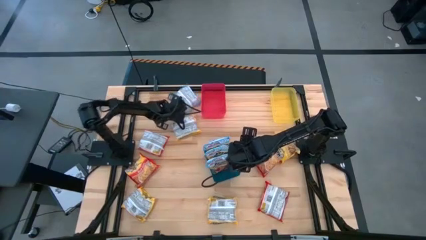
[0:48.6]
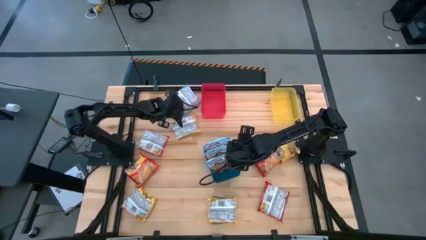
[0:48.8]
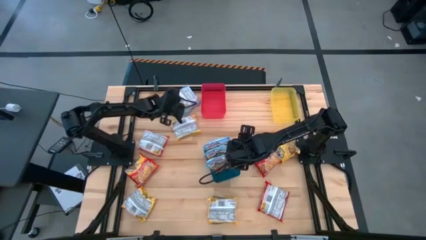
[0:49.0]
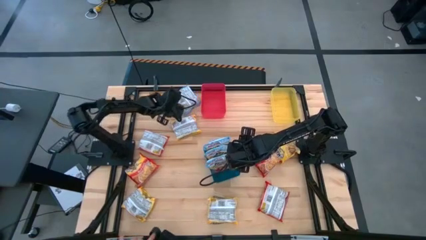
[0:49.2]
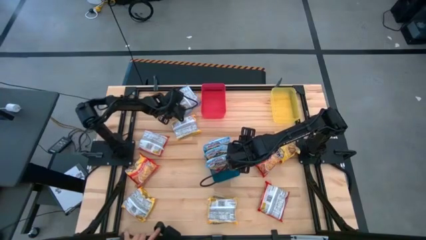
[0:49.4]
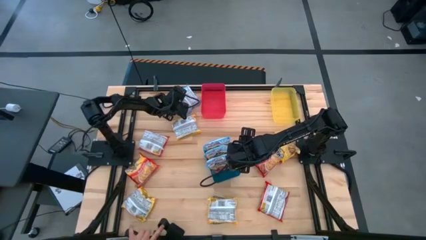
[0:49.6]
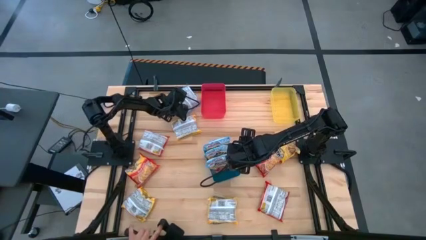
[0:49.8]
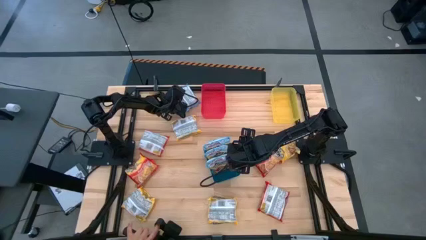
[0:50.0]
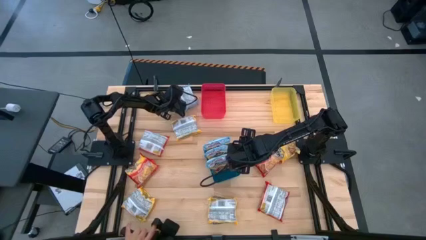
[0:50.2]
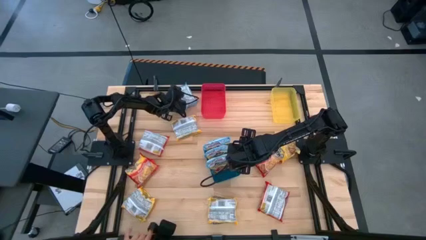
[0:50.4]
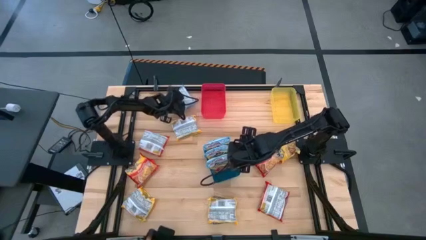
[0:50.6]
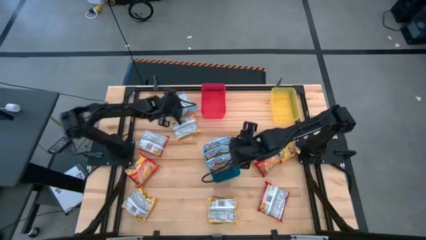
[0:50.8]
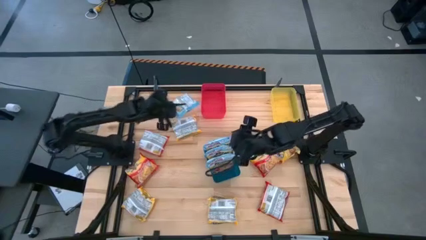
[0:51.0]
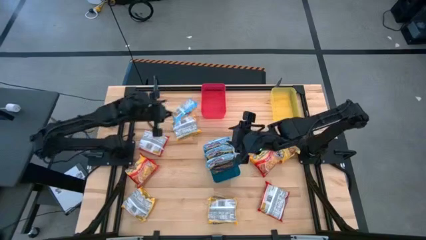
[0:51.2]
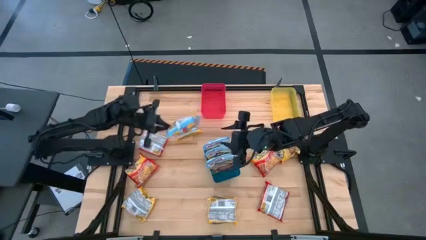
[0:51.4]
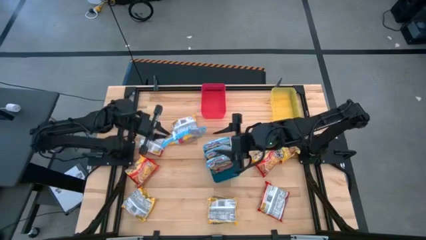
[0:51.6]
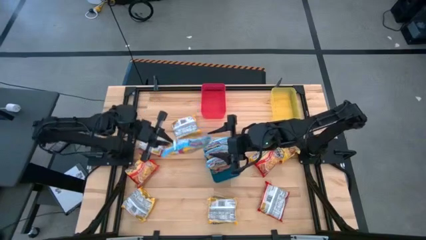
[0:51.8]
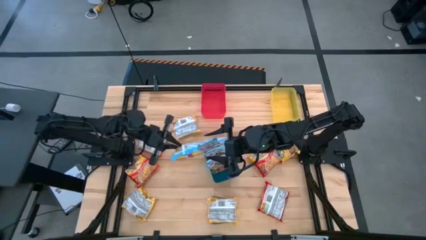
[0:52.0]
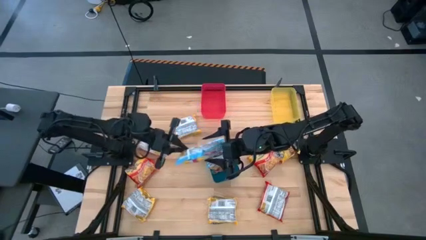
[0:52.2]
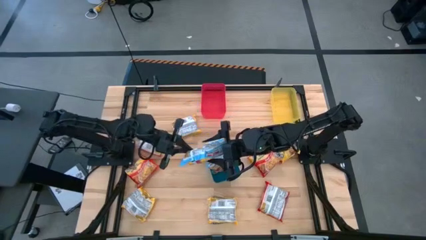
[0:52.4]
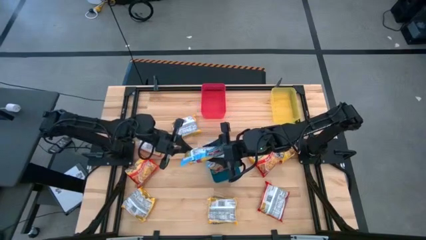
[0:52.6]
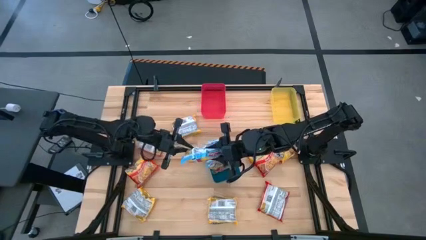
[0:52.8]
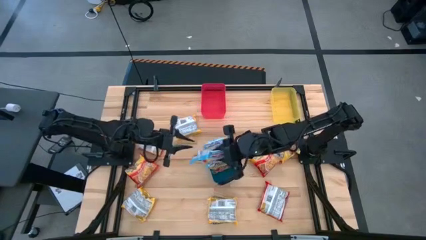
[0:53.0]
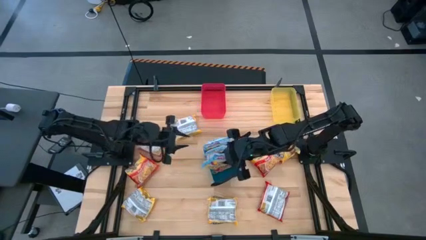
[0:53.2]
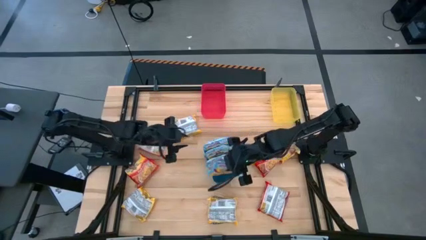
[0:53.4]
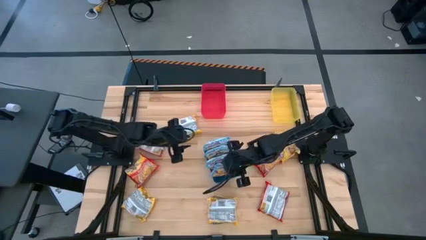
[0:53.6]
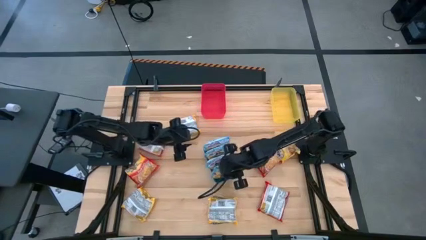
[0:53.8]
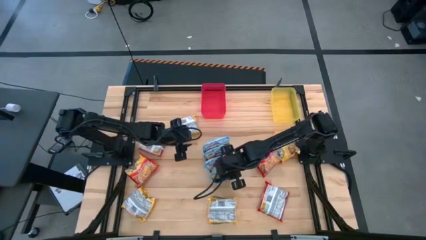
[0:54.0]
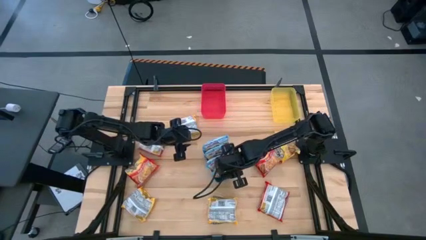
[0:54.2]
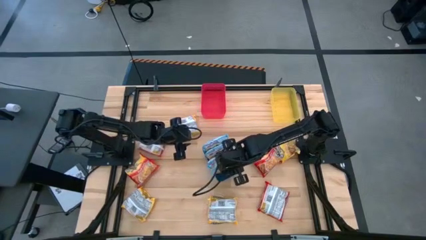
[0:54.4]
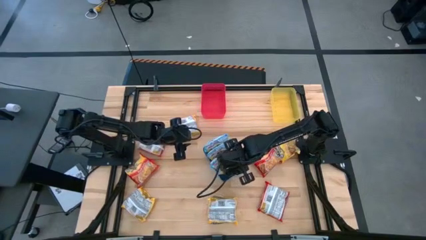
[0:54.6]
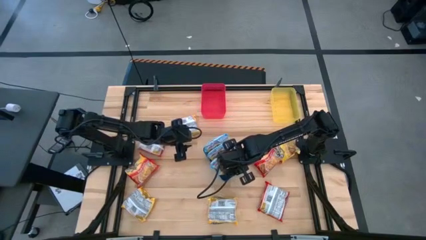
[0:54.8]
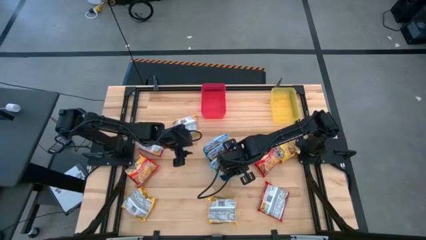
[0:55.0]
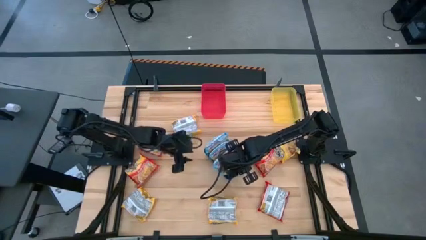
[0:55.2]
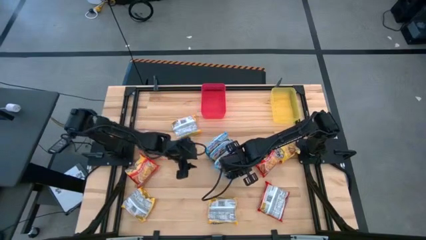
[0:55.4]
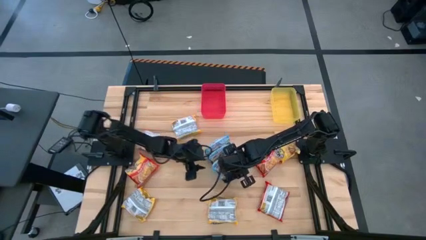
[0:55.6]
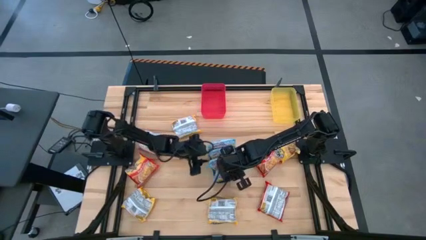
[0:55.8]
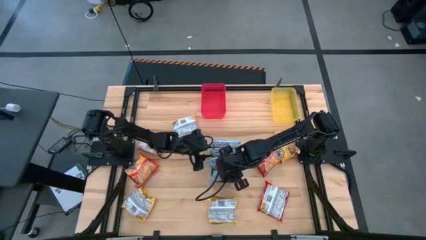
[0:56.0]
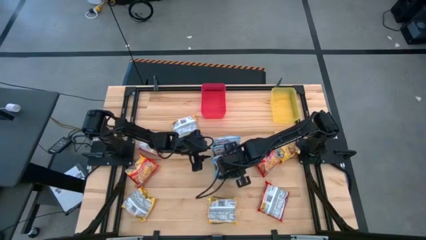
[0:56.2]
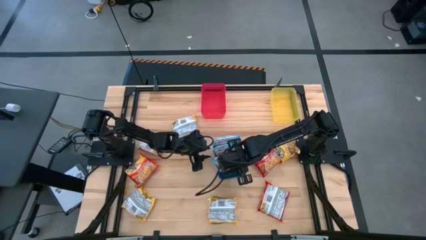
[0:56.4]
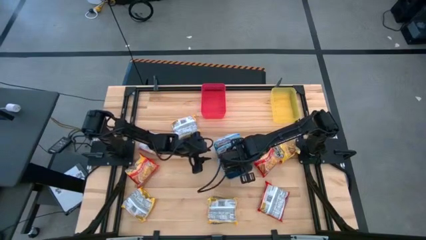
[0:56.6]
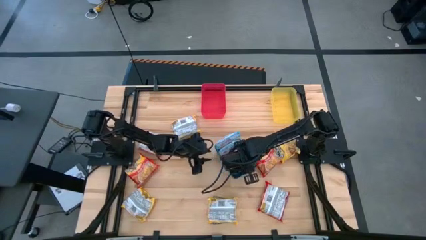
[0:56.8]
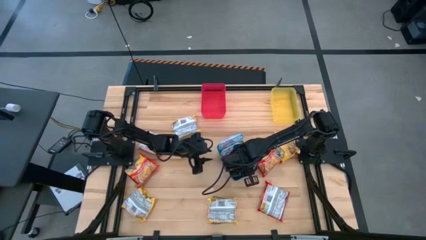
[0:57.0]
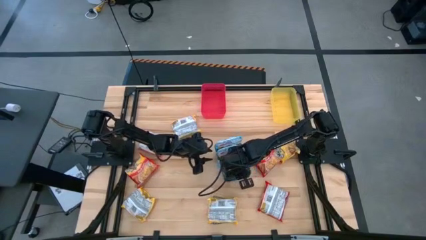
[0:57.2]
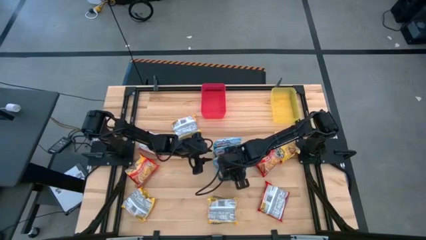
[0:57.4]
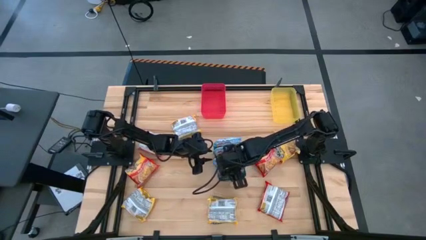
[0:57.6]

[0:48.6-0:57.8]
Task: Sort Maruchan noodles
Put the blue noodle pack into the blue bin

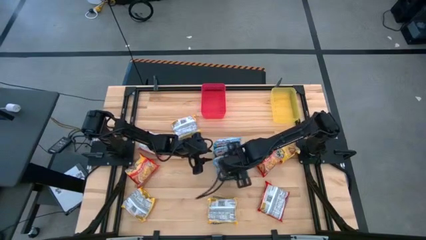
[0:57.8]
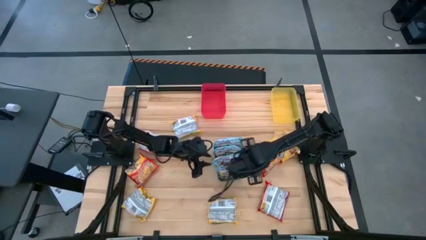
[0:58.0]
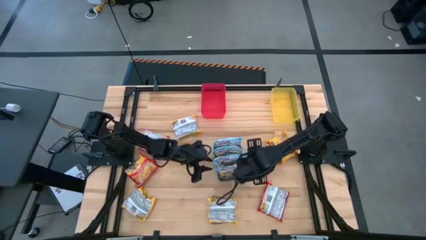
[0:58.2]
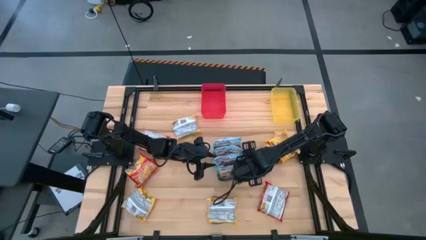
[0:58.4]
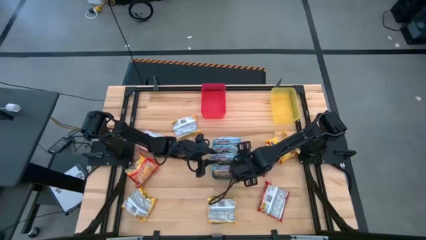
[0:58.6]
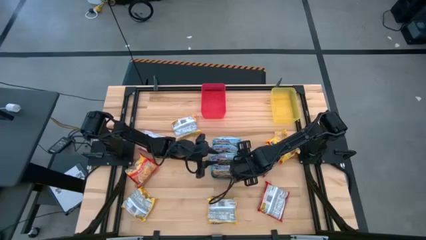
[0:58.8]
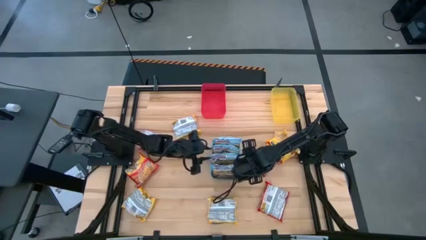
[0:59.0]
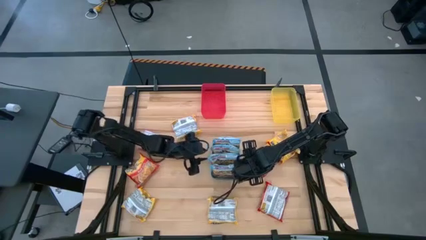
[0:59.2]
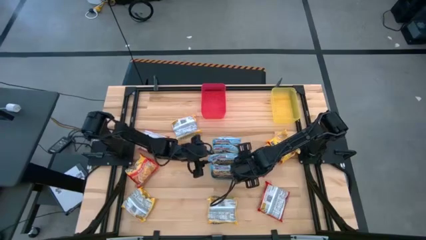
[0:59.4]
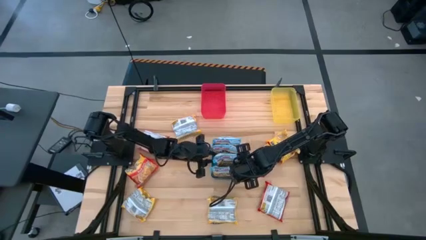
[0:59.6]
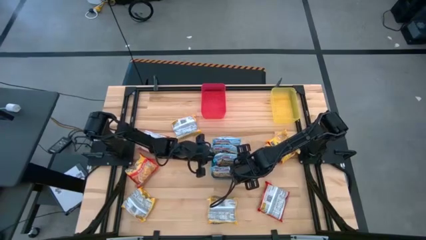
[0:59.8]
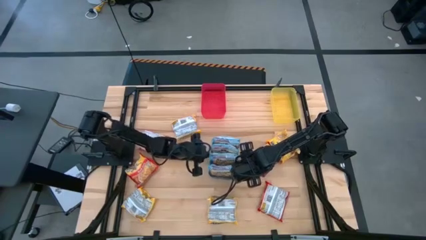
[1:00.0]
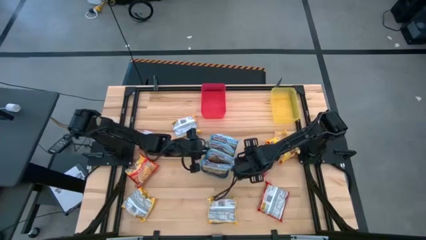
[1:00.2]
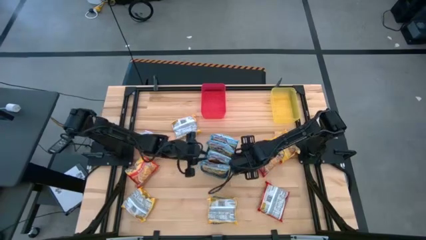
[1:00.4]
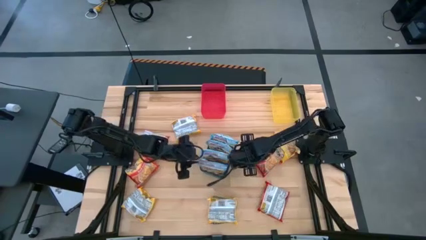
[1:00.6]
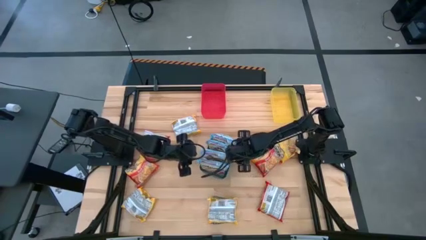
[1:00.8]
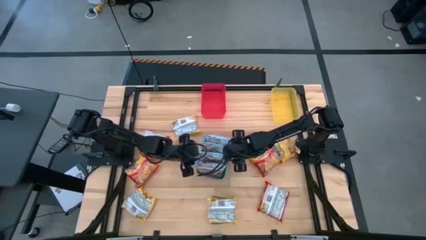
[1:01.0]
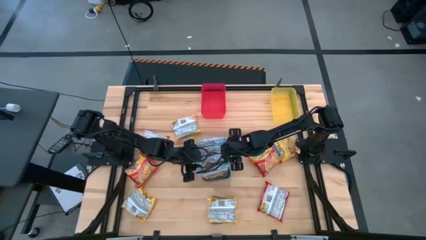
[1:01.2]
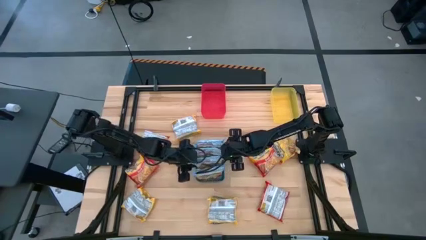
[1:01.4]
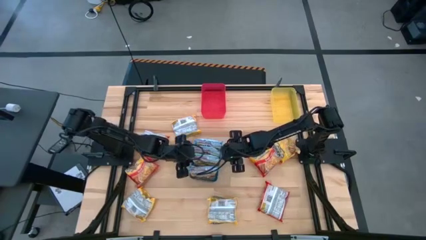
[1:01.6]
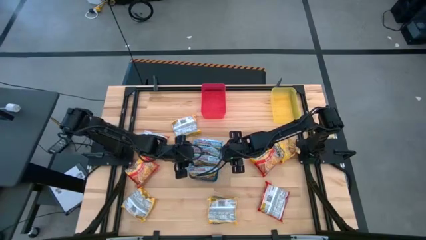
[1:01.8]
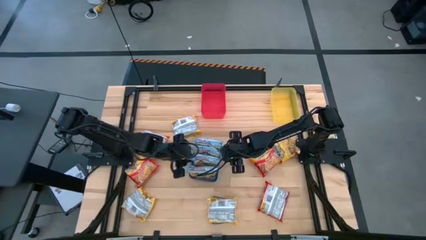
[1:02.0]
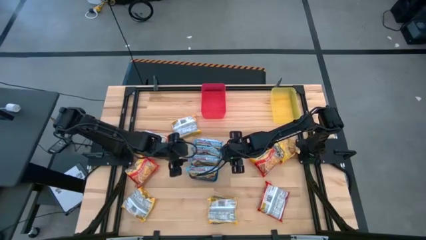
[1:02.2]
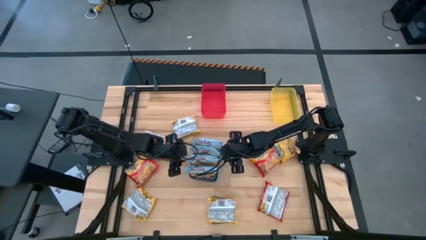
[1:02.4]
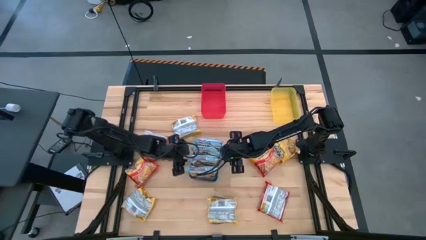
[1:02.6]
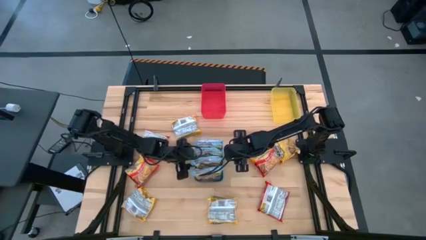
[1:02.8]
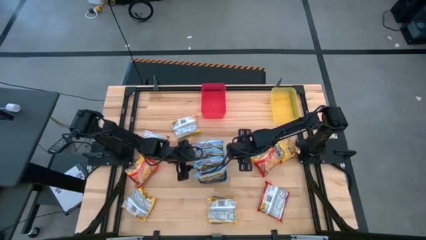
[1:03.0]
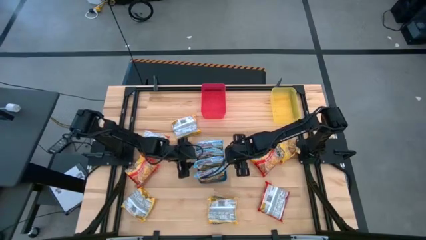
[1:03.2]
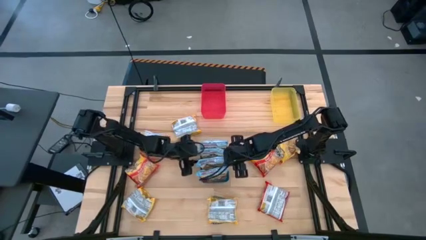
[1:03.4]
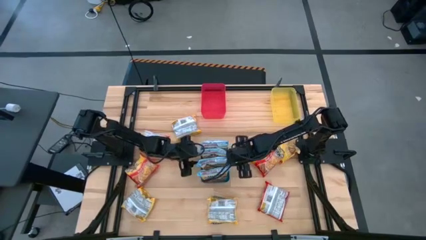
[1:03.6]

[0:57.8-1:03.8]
Adjust the blue bin on the table
